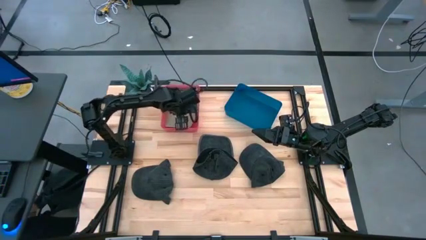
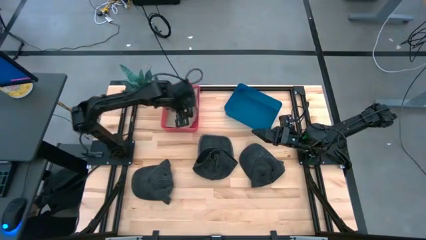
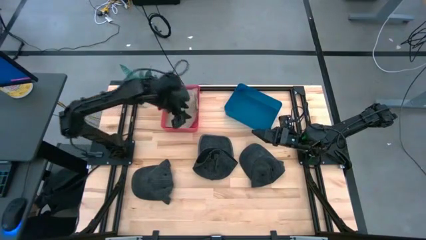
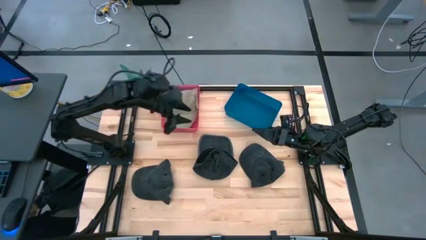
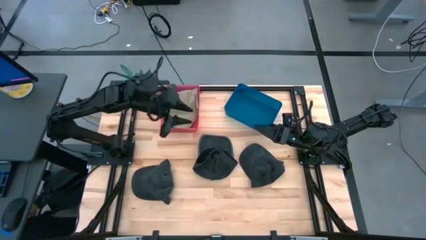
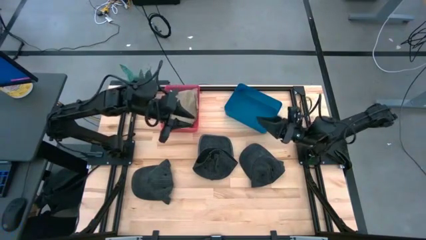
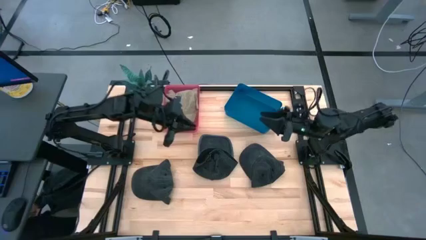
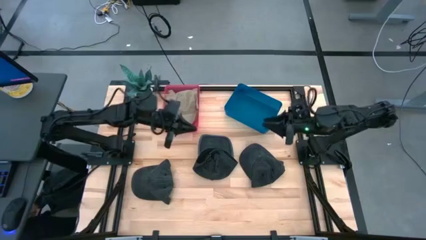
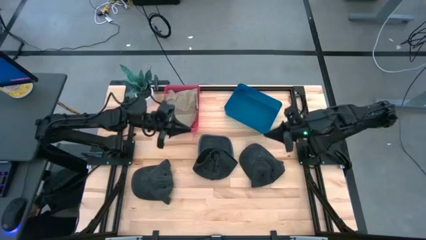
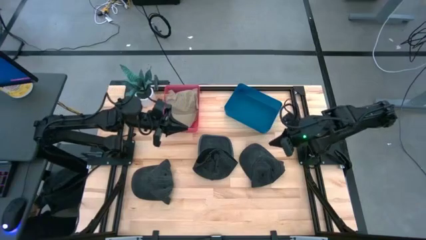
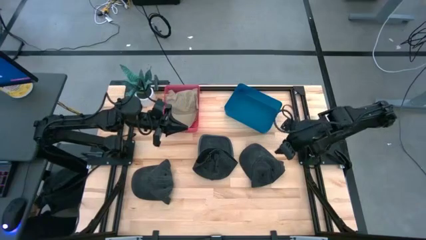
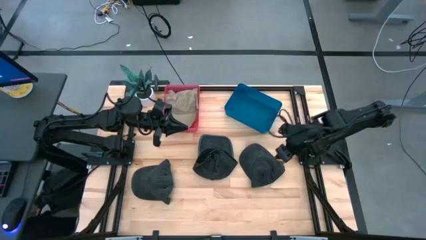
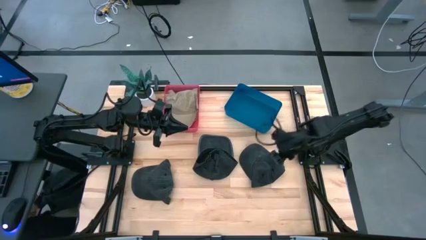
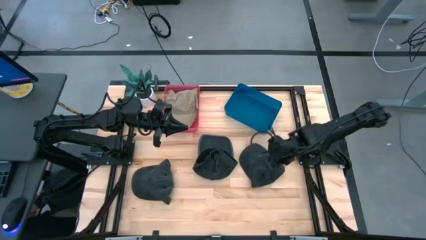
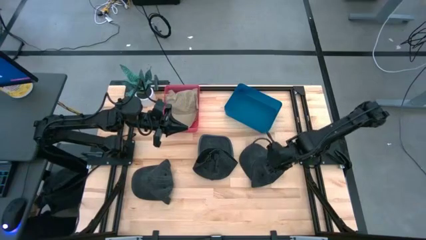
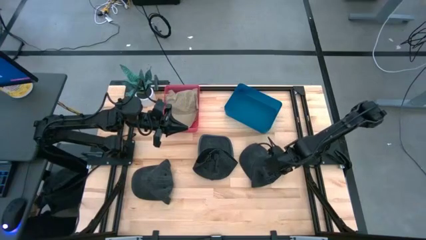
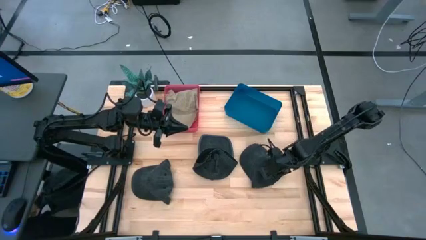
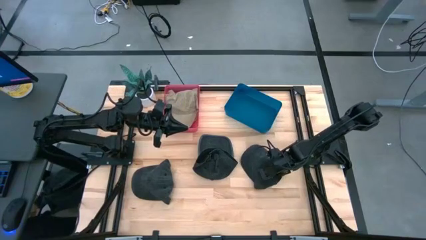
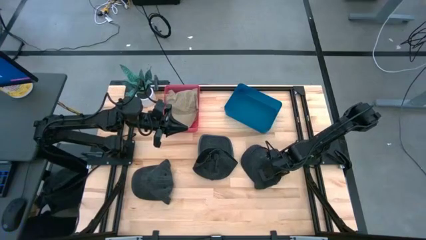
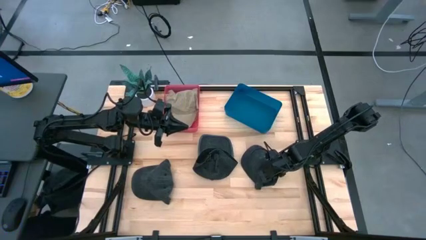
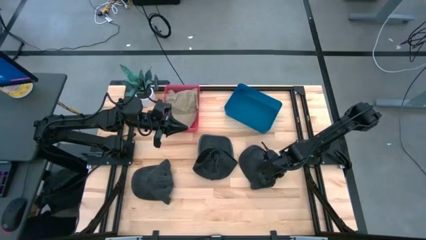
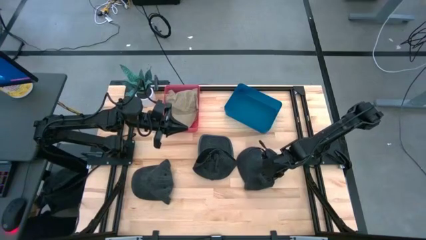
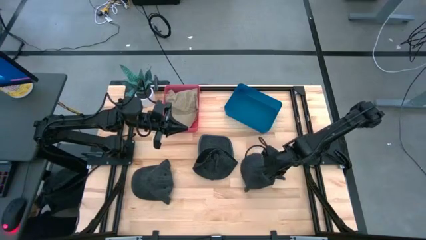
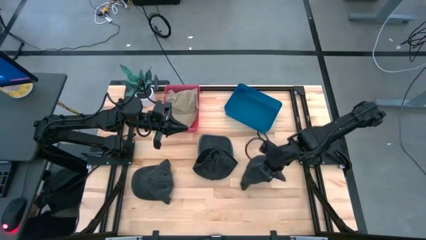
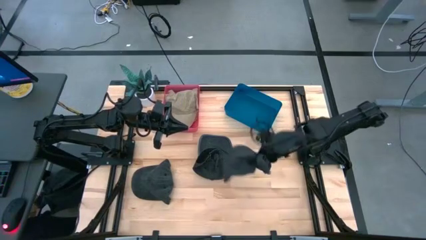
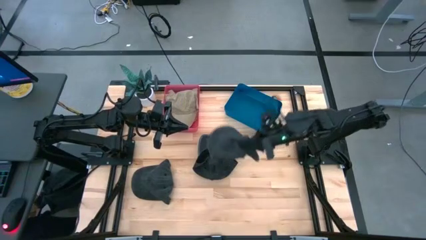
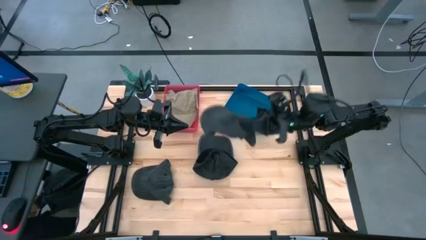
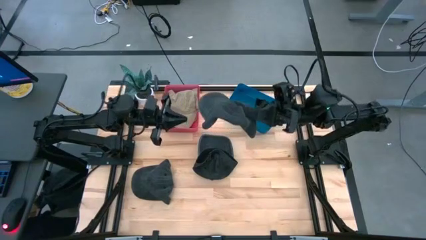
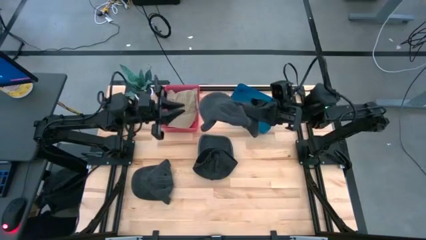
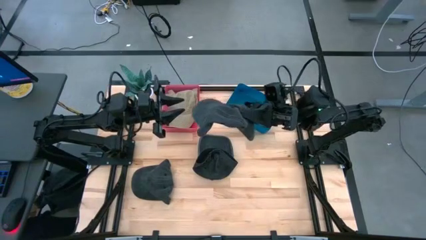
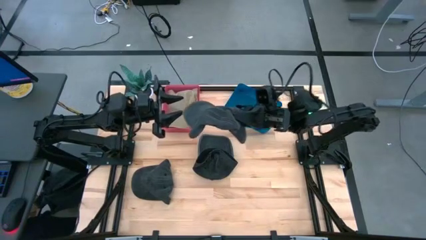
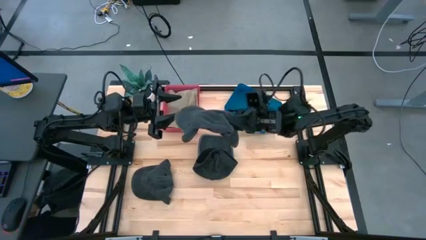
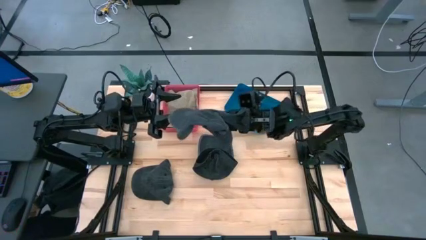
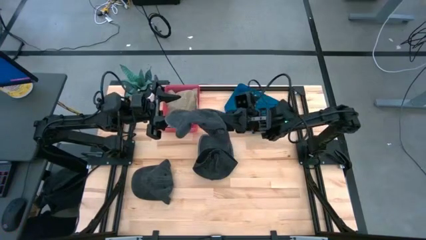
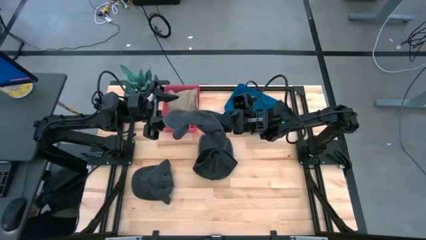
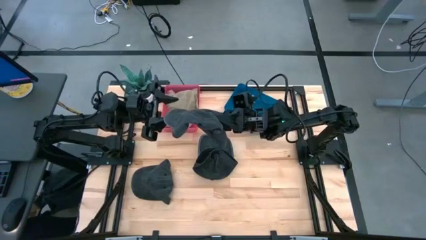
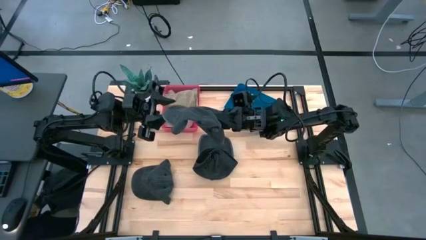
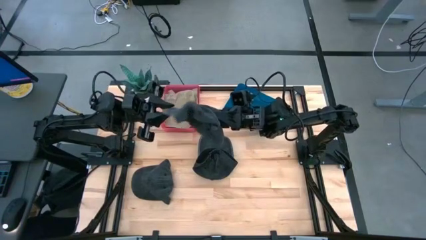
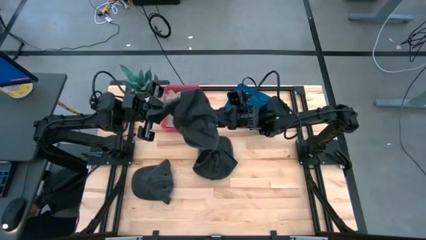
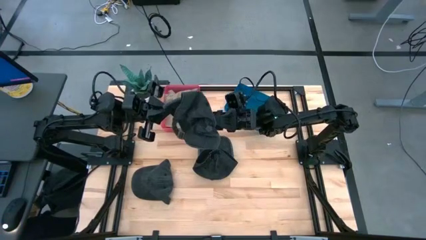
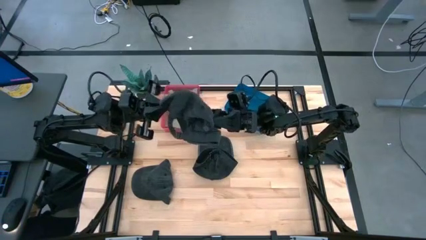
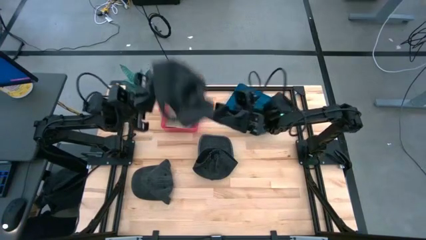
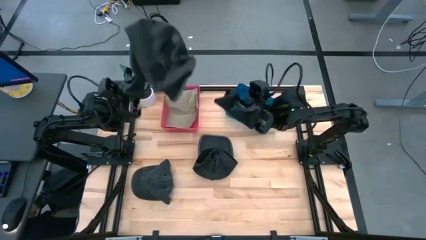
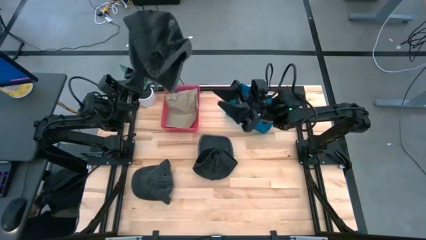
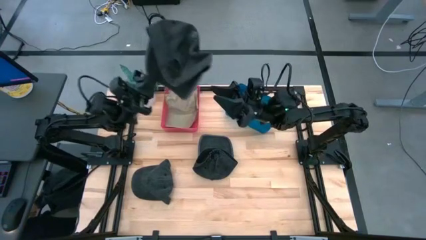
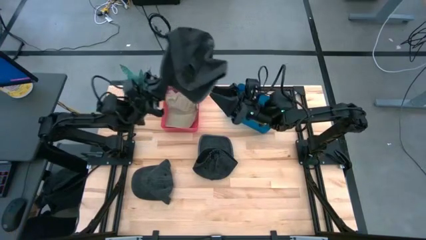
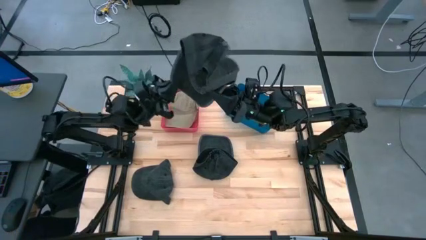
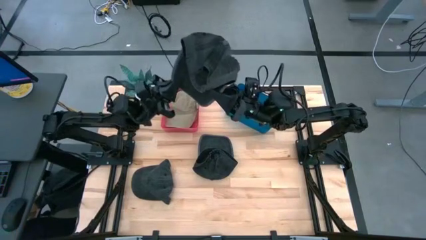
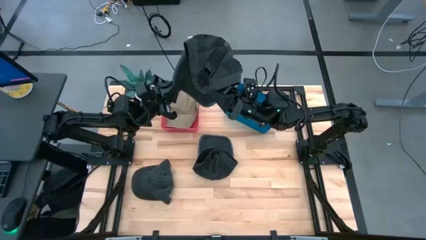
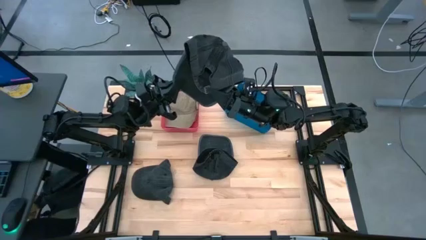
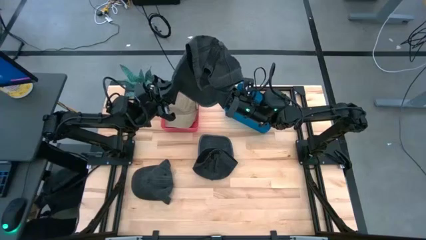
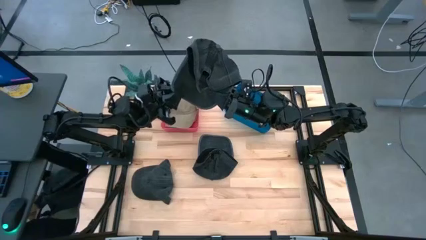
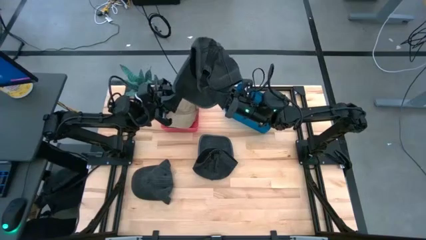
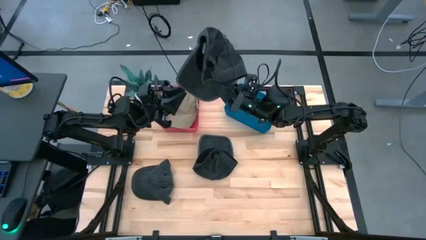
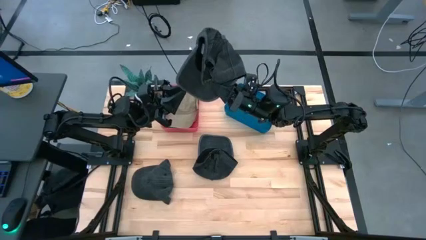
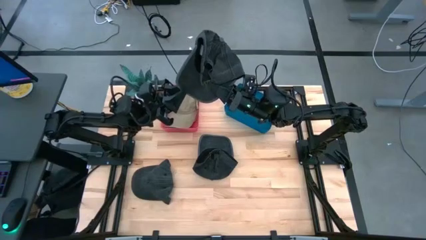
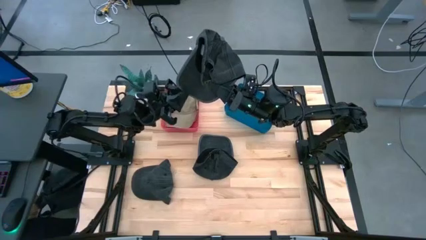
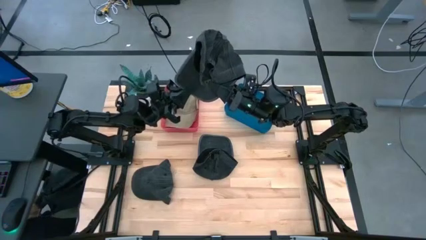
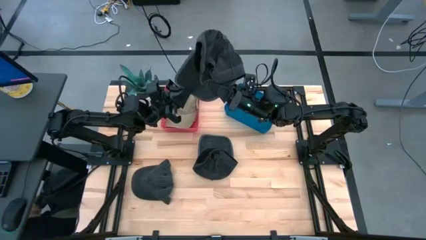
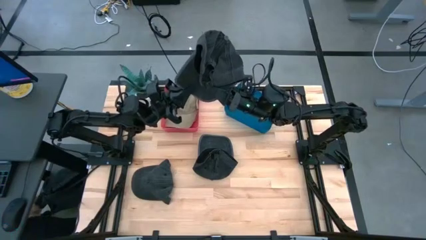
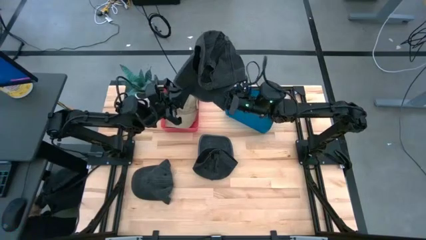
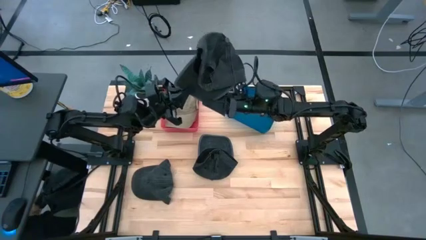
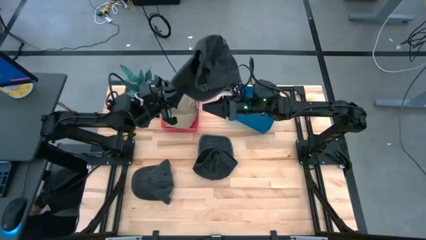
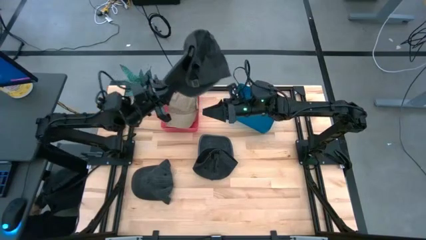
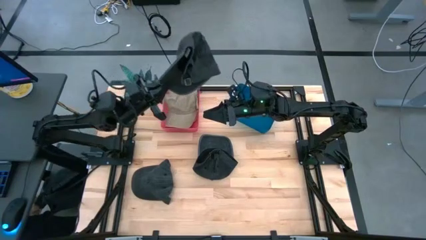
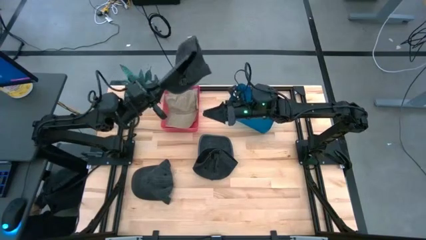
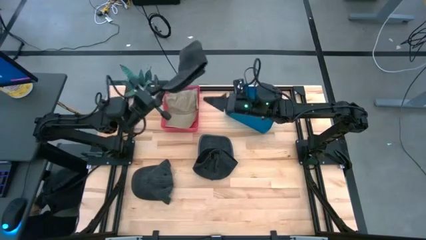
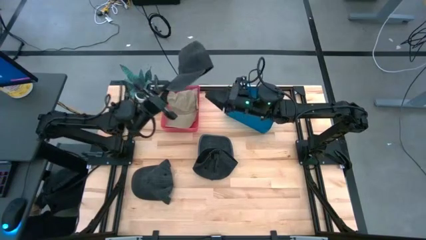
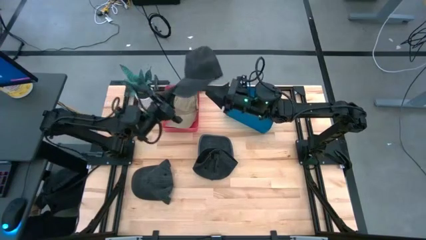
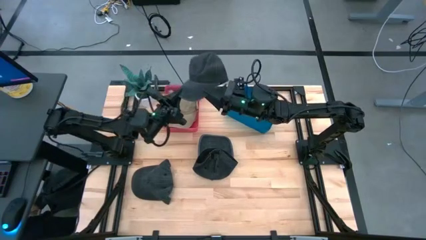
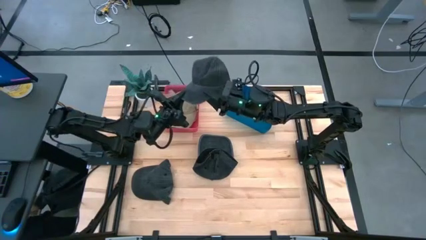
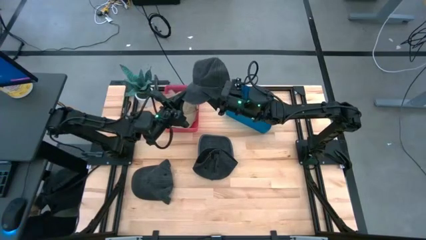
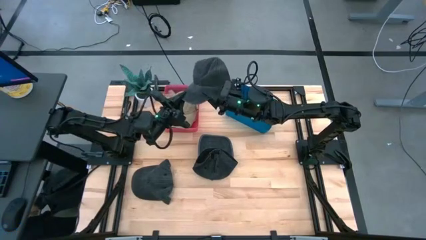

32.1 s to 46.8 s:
Task: Pick & Place hat
Put the right black cap into the blue bin

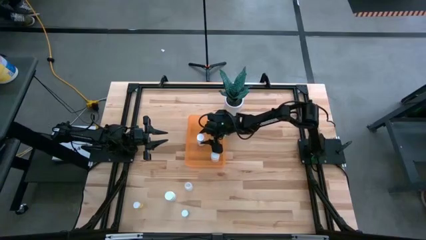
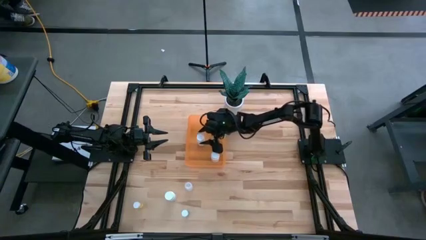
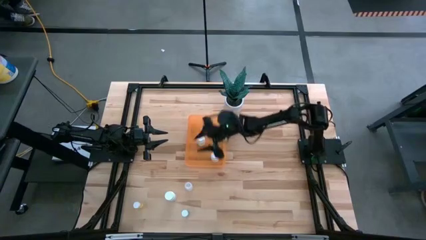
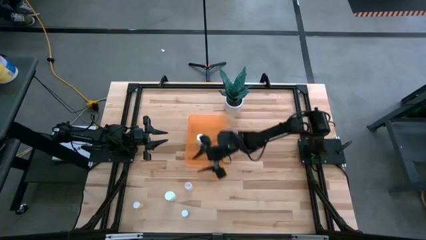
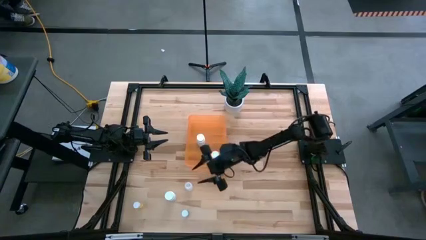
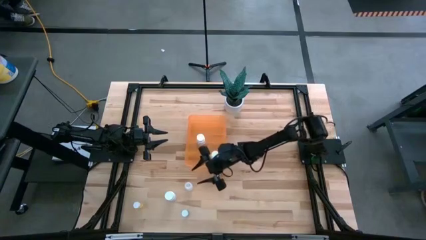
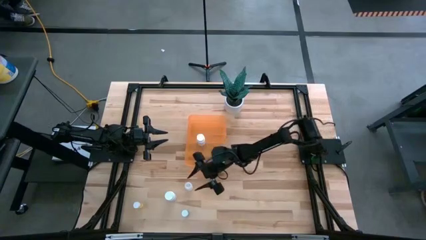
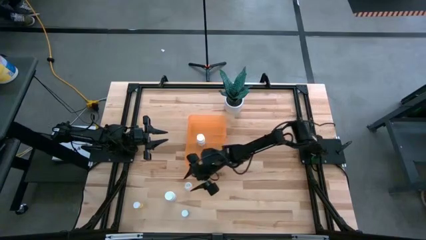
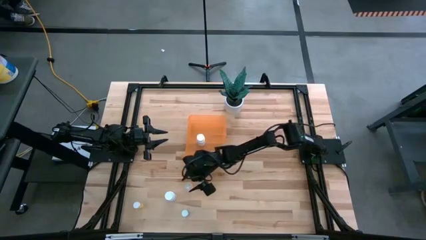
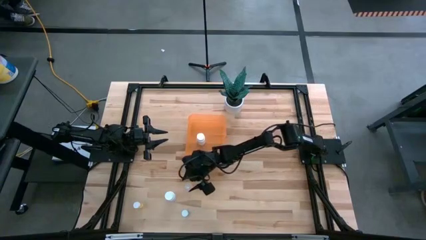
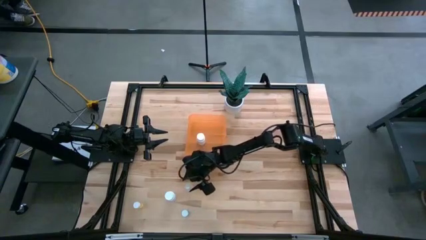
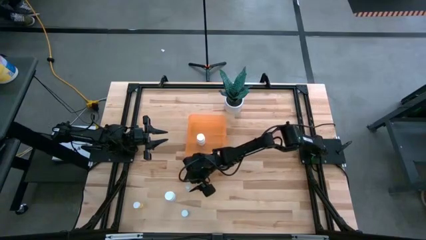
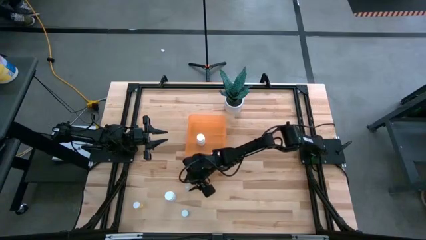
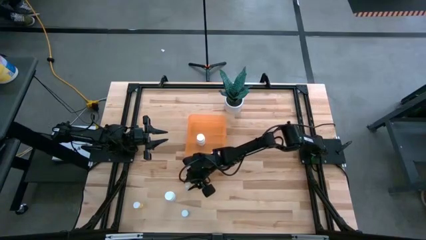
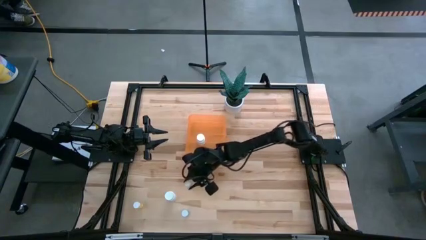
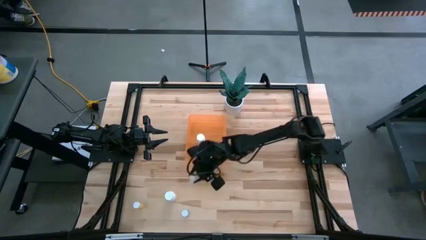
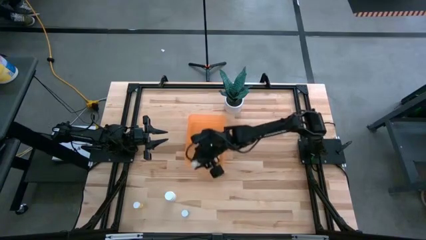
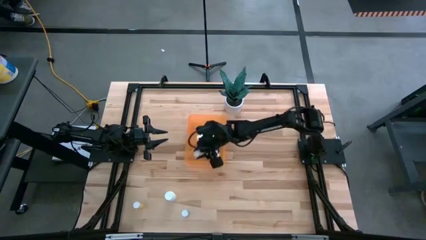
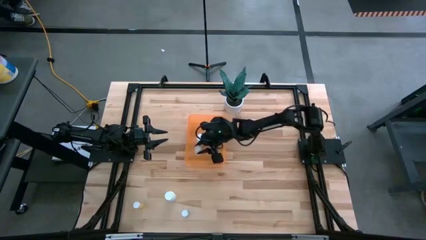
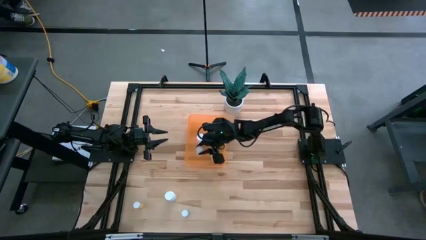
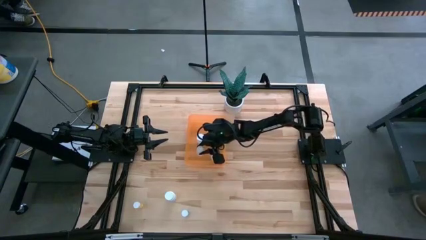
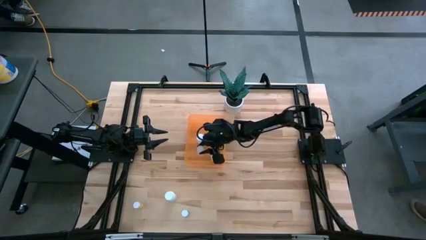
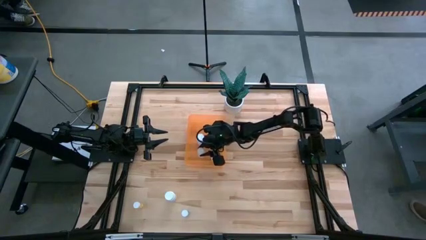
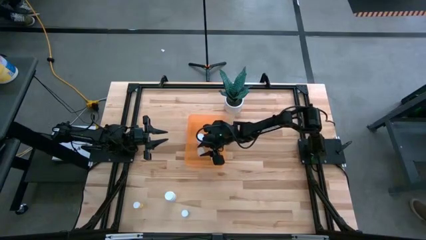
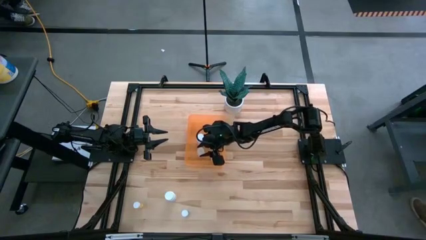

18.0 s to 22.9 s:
Task: Pick and place pill bottles into a basket
Put the top transparent pill bottle into the orange container
